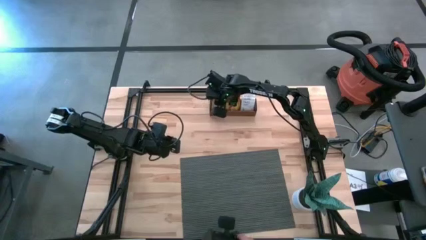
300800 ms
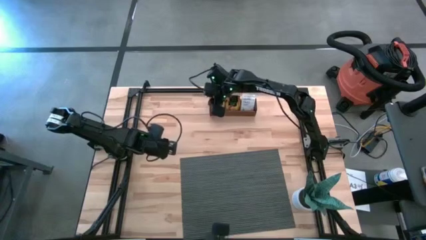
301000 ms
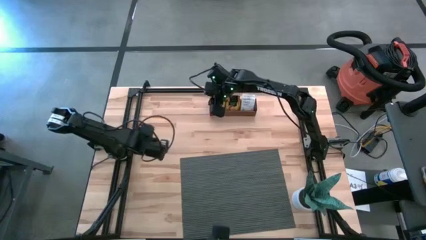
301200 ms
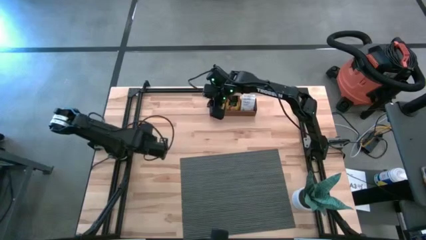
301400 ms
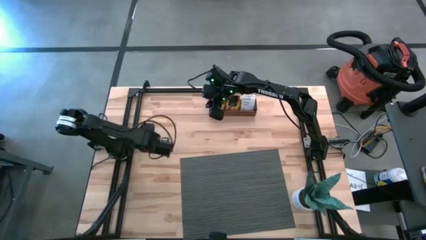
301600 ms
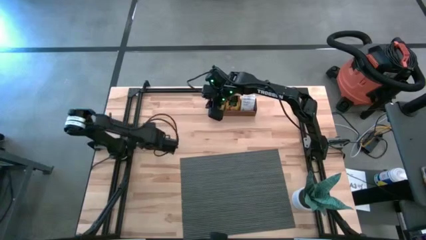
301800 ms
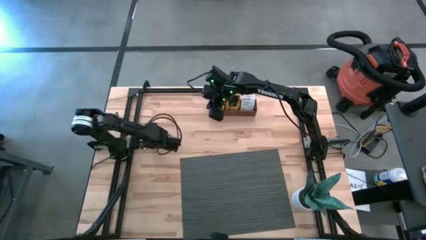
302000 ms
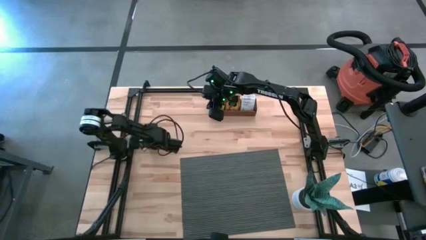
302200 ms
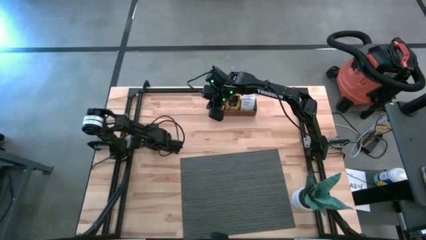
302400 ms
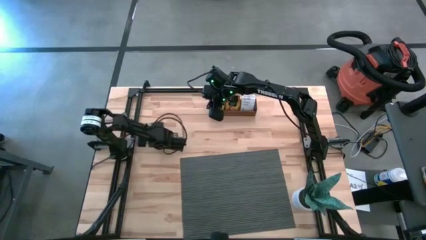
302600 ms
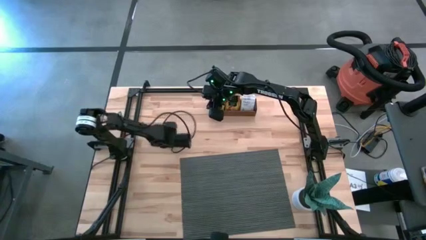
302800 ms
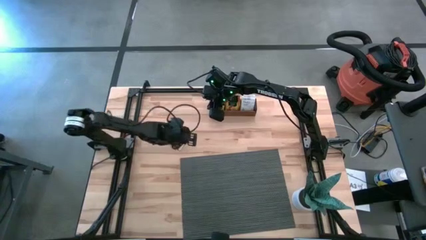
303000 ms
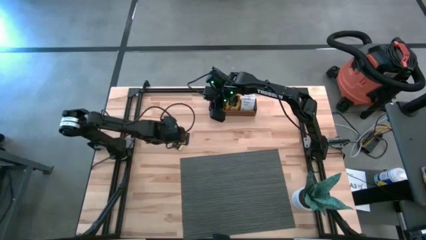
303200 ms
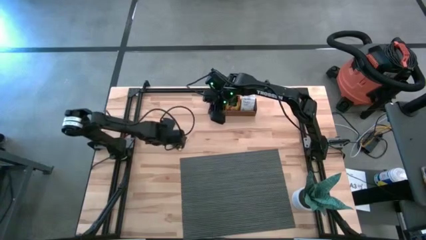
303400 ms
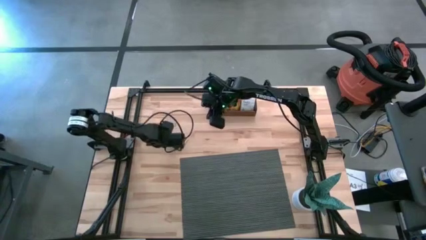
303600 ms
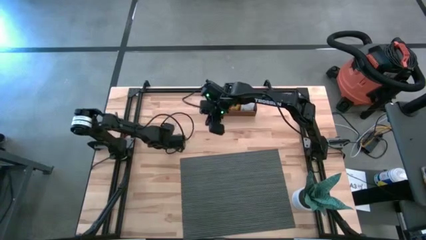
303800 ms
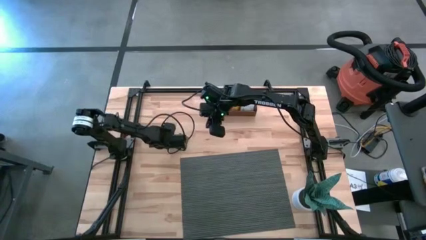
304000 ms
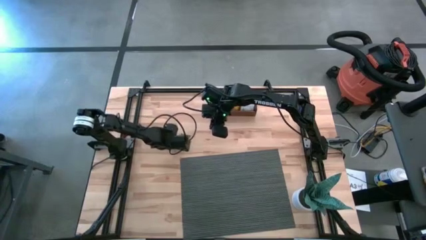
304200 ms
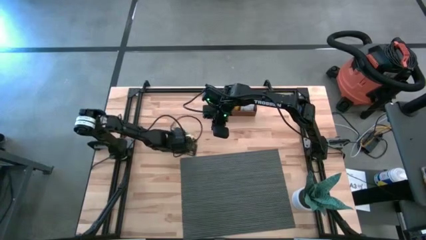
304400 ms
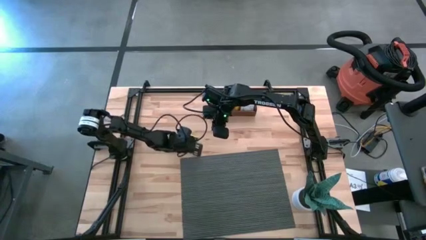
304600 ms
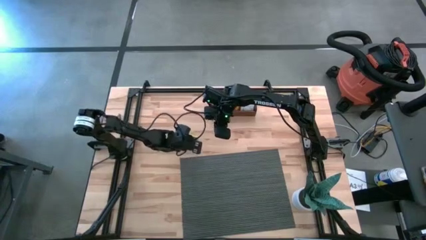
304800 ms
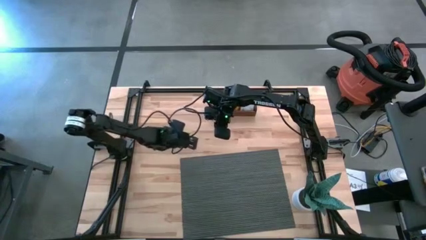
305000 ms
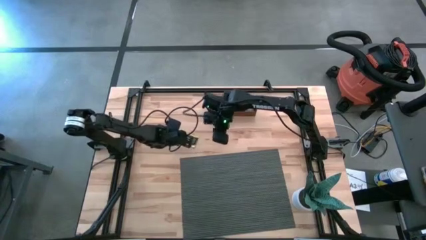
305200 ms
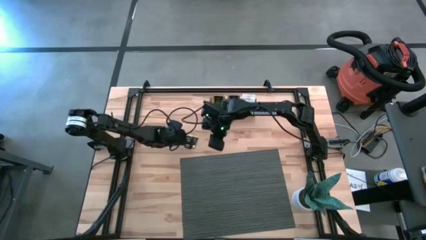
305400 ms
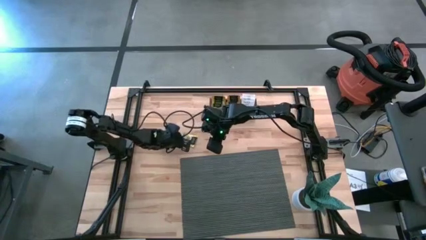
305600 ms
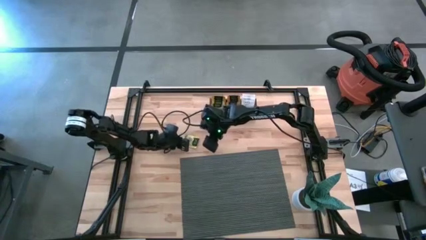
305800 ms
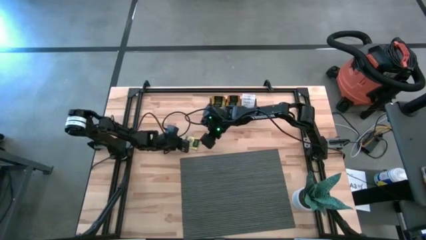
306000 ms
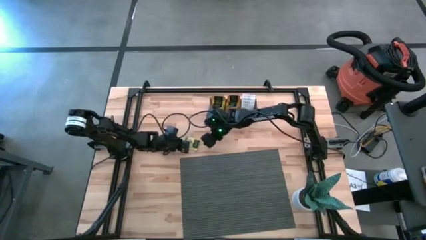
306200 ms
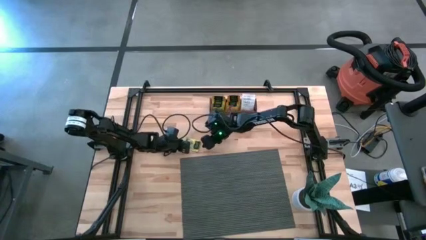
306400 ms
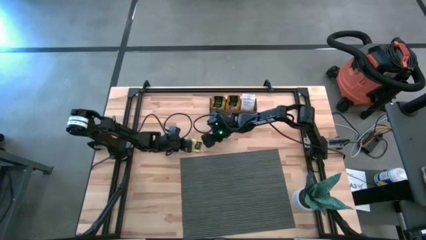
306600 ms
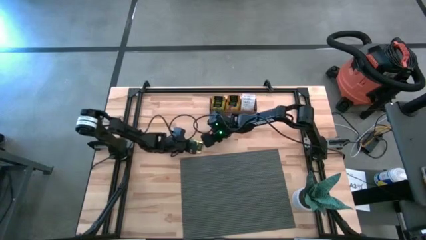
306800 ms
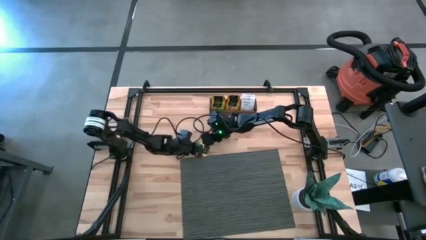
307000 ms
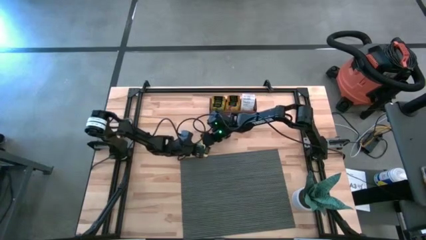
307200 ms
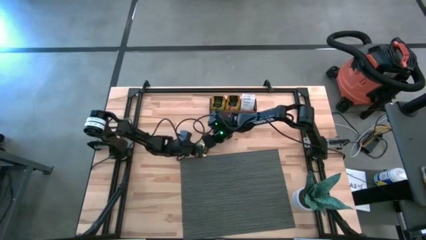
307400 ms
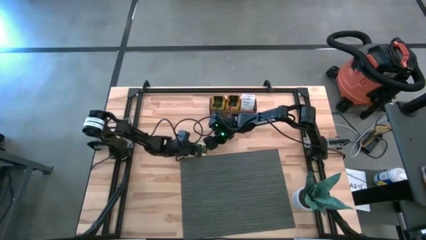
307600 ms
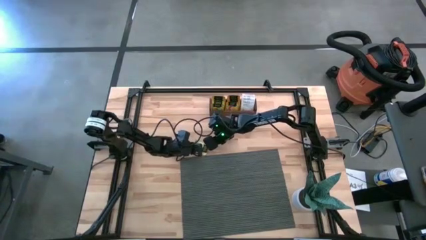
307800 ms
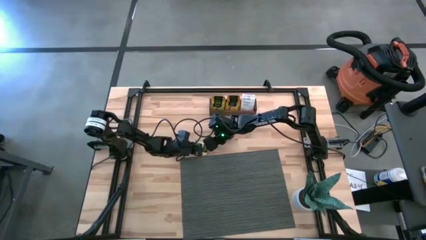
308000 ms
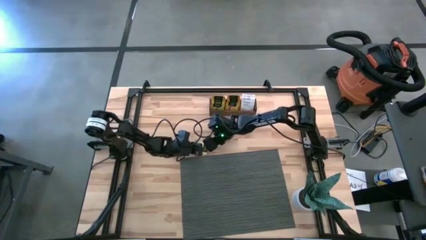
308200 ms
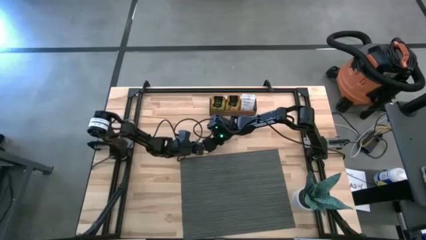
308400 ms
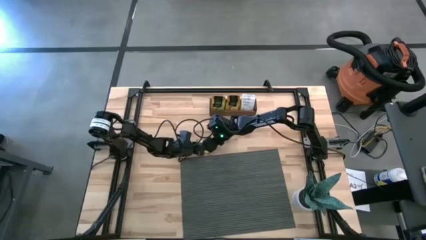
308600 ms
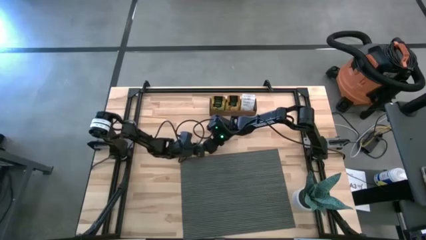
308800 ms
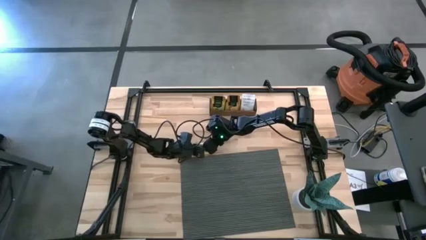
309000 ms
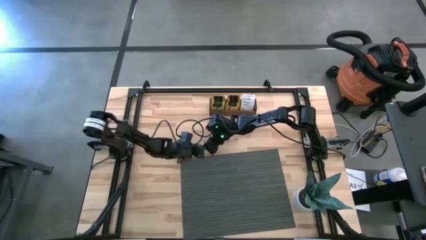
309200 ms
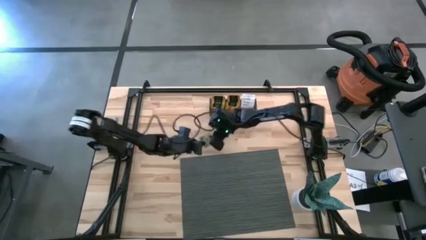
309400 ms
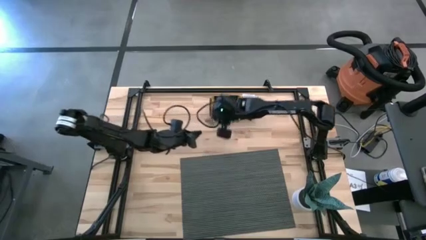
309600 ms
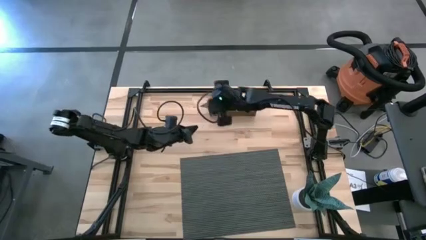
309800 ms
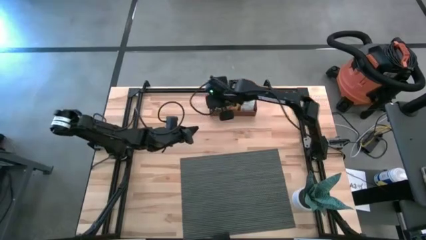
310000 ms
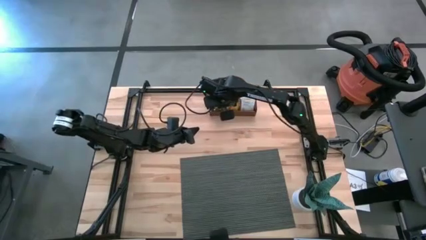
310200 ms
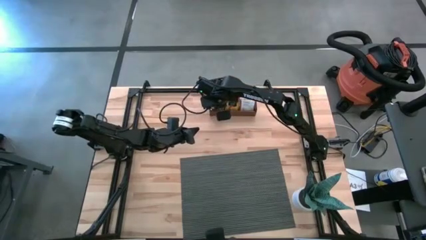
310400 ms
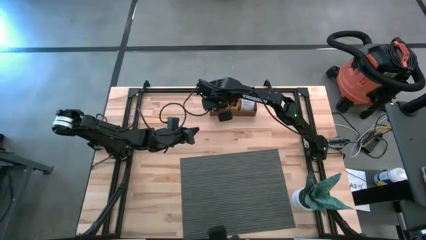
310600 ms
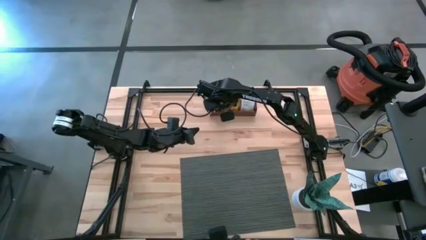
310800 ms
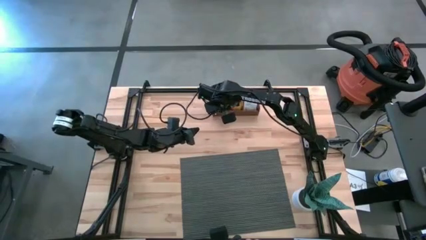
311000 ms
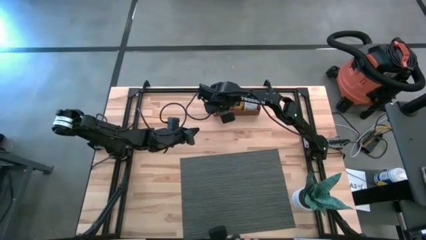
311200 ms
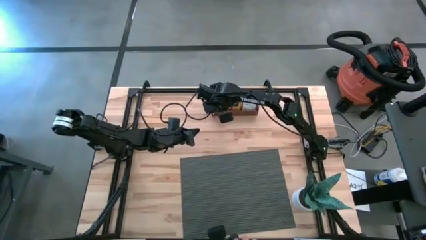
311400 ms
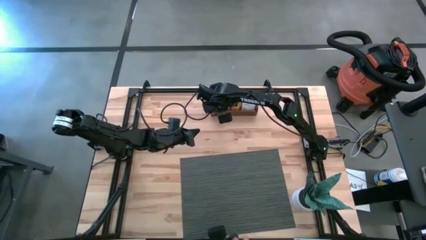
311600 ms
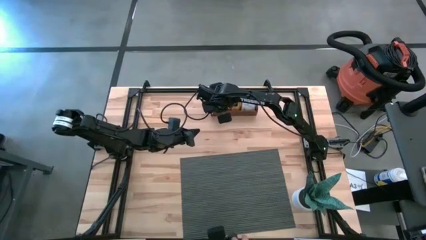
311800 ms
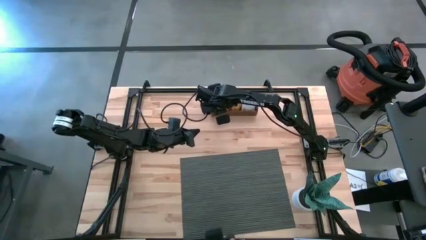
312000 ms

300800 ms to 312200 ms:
Task: Pick & Place Tea
Put the yellow tea bag into the left section of the wooden organizer

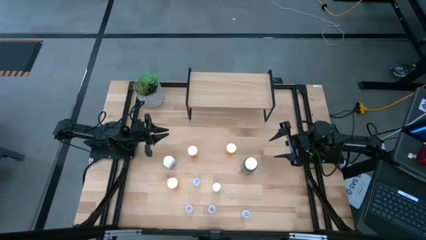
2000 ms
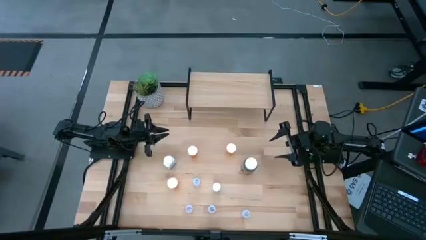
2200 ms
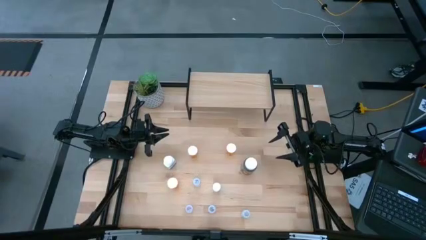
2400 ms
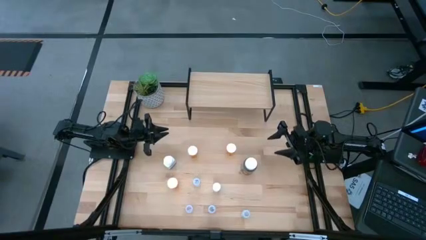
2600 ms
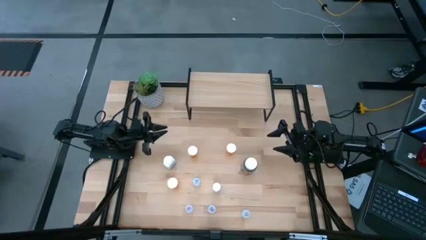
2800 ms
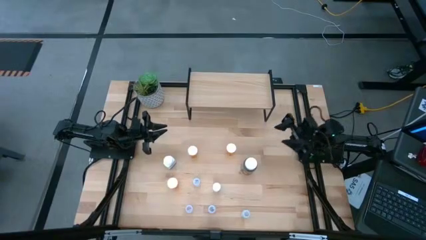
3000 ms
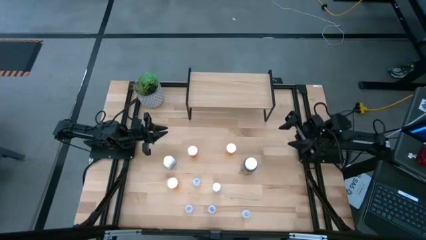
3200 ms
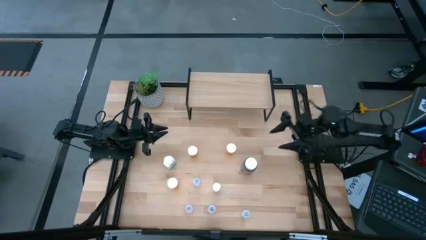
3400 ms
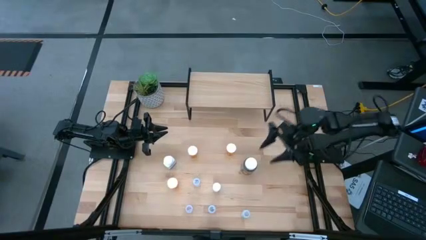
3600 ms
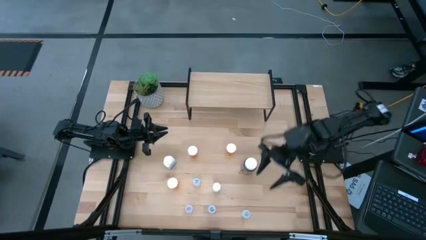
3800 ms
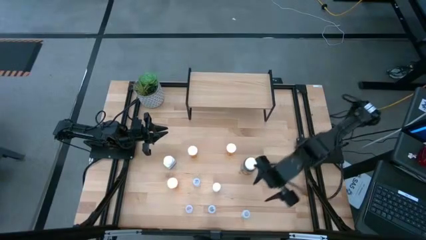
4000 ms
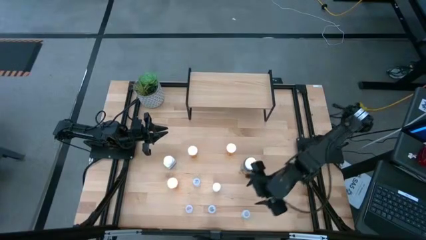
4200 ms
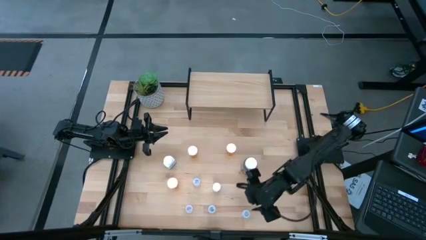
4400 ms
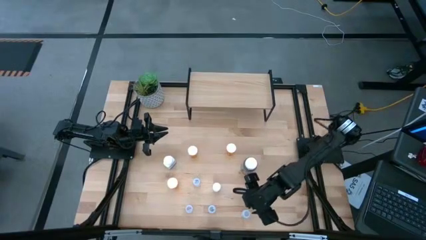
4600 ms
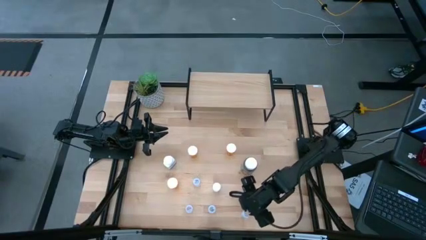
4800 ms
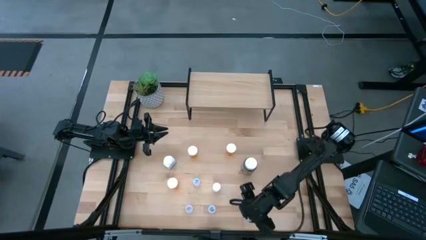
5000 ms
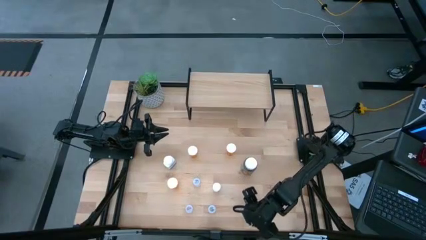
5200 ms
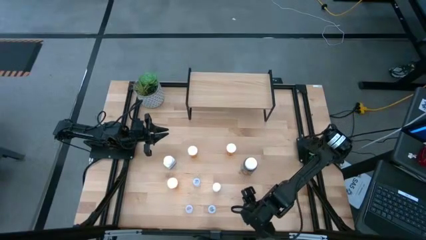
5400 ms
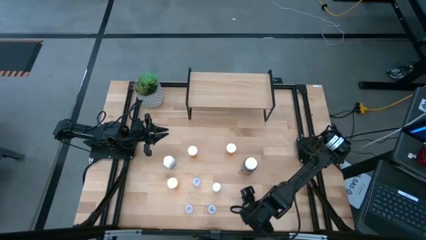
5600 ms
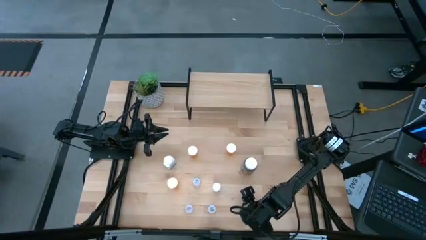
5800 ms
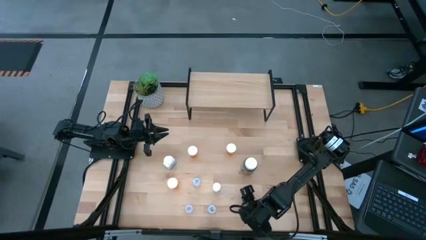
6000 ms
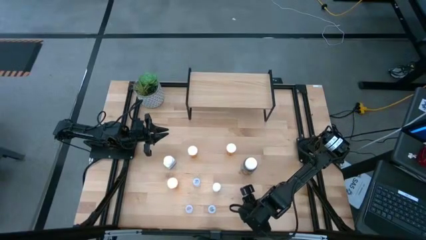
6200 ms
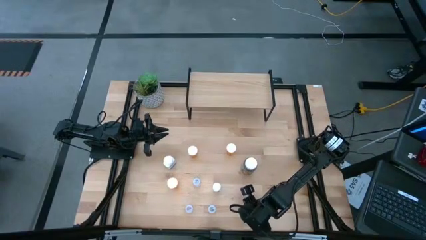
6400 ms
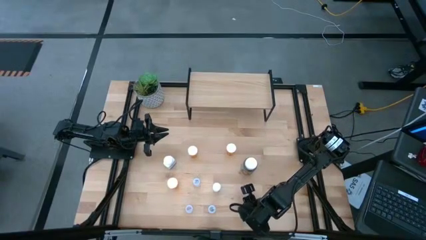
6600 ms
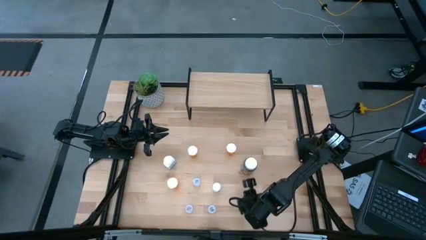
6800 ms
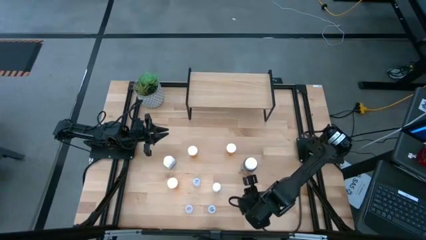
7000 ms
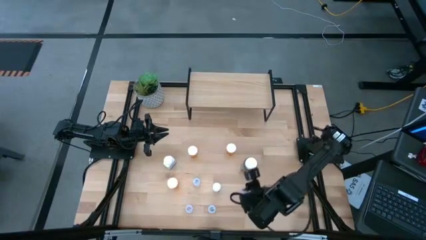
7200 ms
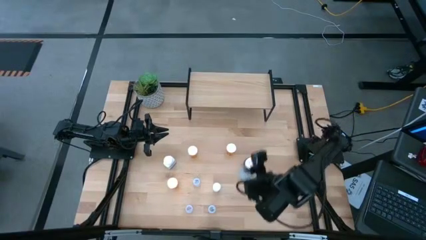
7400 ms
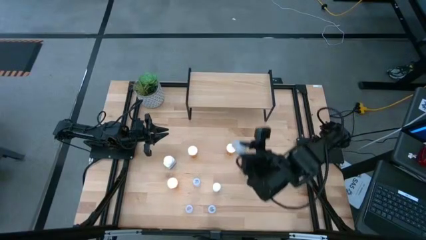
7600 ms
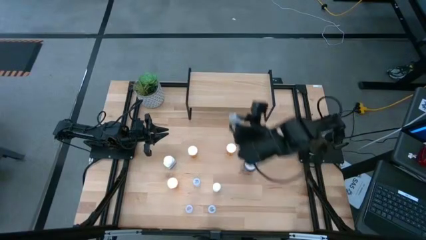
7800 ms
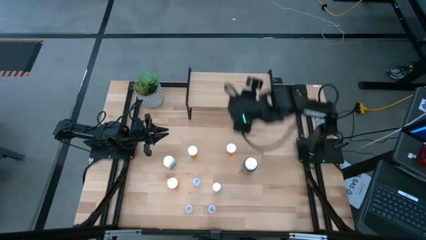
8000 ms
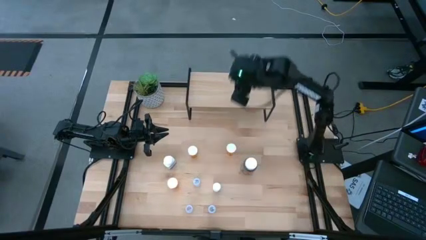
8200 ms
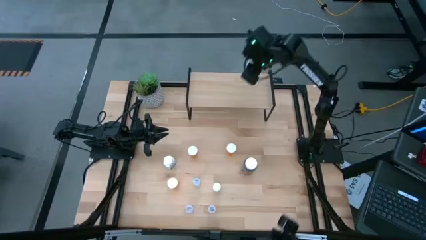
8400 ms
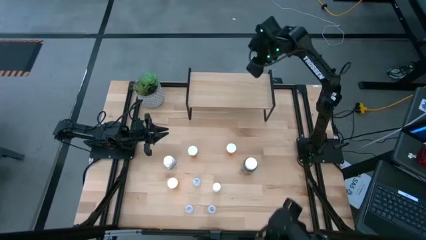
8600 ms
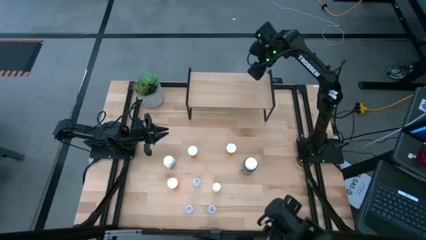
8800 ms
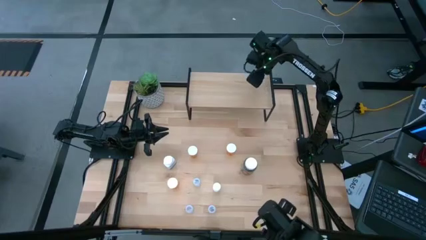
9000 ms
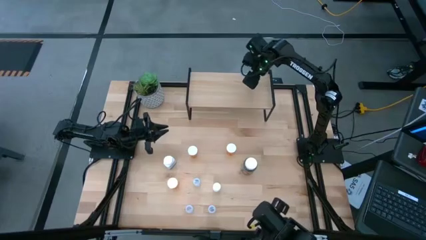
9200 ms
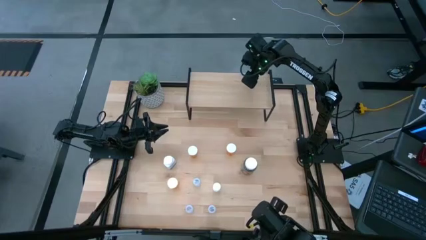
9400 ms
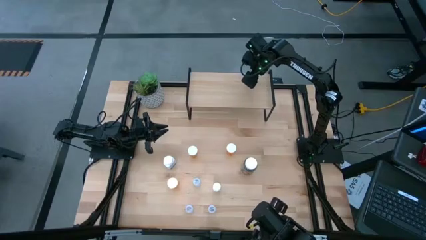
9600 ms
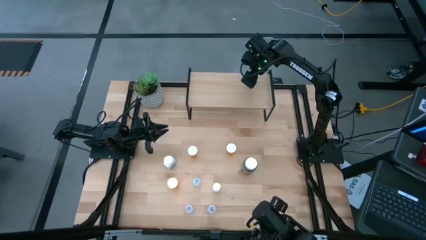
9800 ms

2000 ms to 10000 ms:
Task: Pick and place medicine bottles onto shelf by color
Put the transparent pill bottle on the shelf
